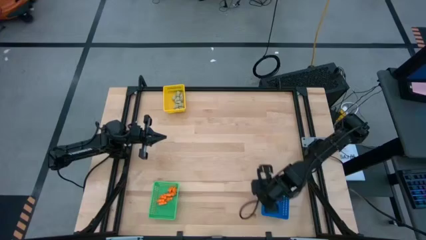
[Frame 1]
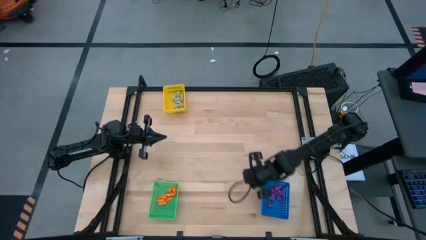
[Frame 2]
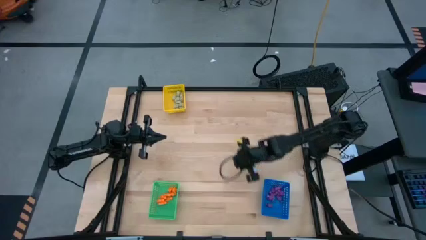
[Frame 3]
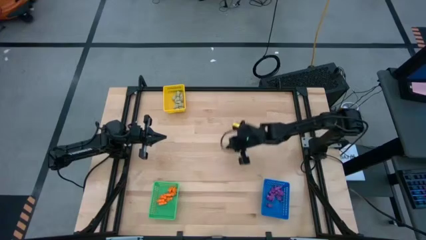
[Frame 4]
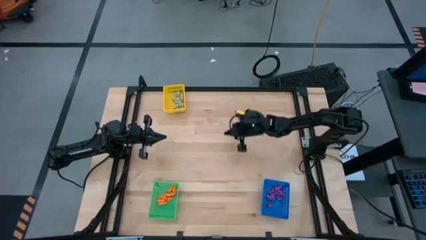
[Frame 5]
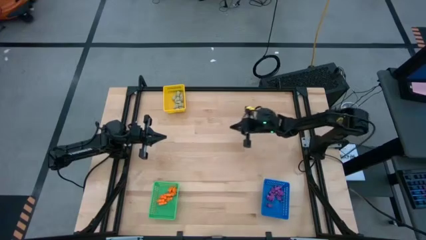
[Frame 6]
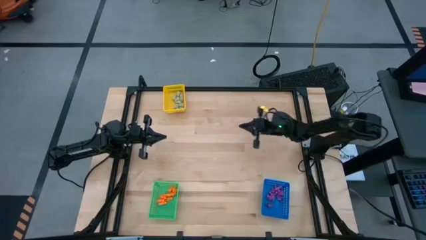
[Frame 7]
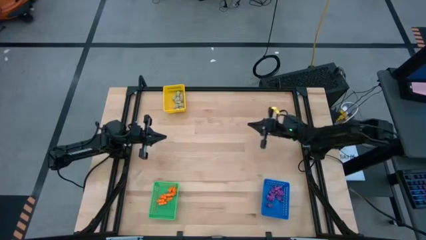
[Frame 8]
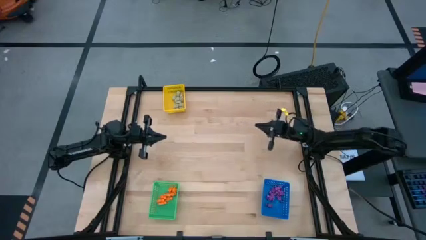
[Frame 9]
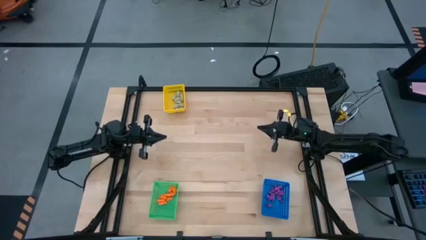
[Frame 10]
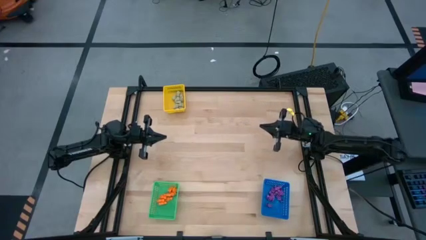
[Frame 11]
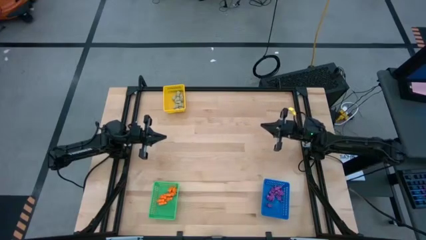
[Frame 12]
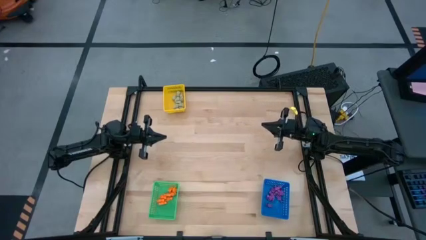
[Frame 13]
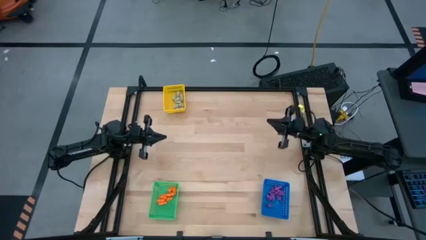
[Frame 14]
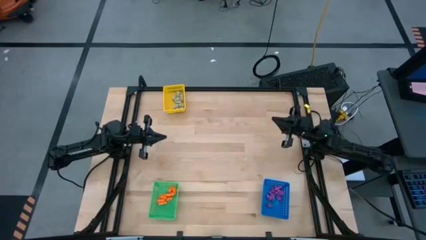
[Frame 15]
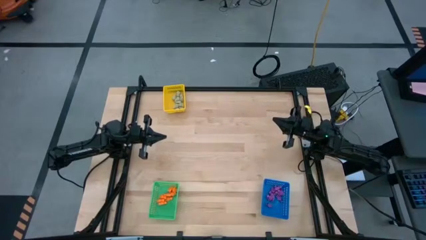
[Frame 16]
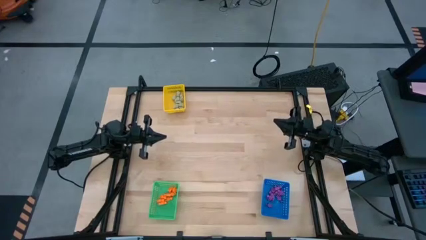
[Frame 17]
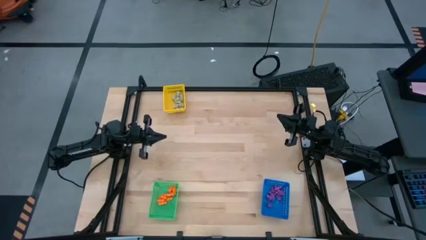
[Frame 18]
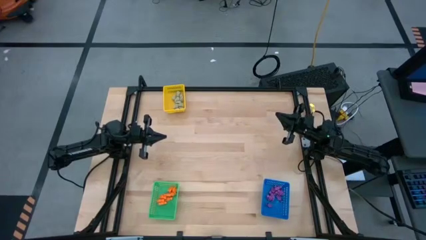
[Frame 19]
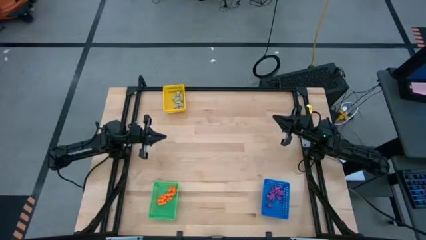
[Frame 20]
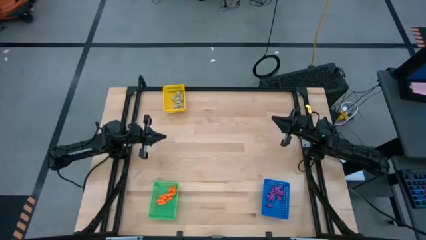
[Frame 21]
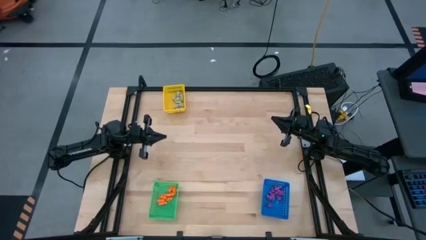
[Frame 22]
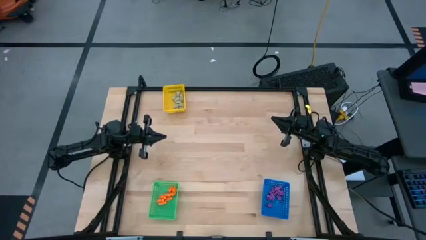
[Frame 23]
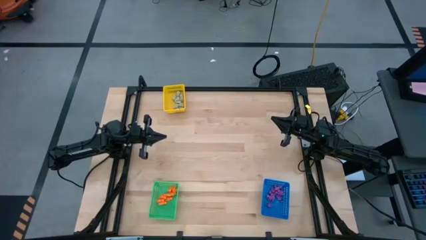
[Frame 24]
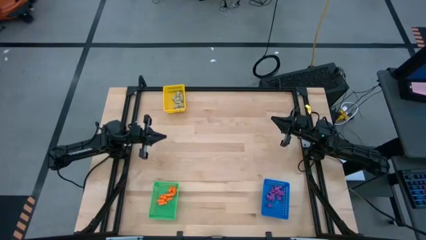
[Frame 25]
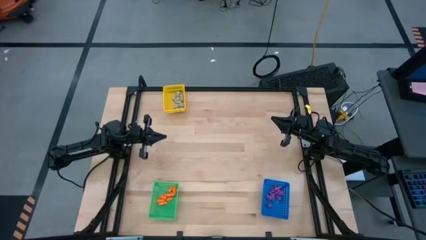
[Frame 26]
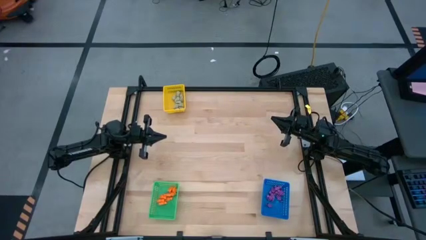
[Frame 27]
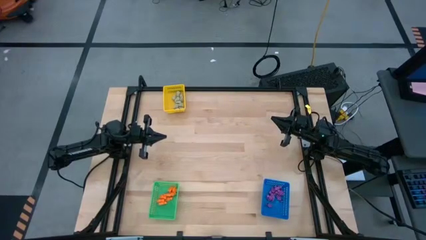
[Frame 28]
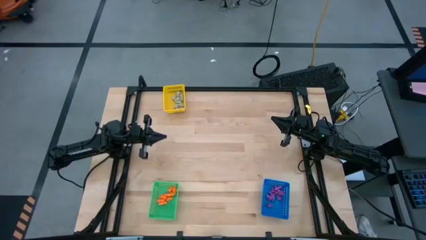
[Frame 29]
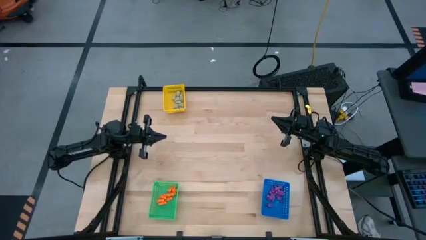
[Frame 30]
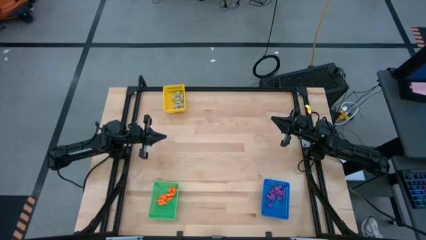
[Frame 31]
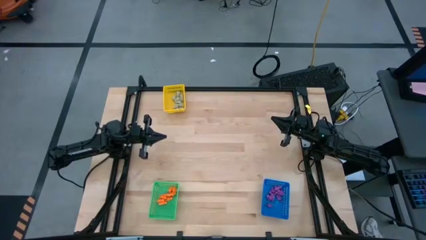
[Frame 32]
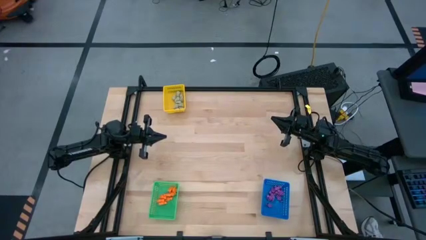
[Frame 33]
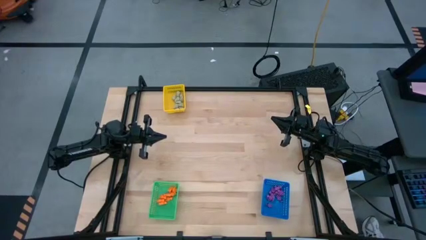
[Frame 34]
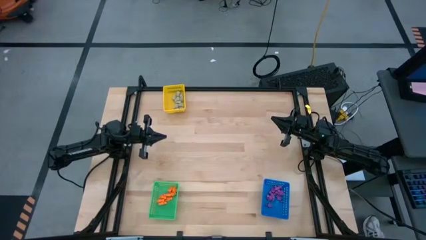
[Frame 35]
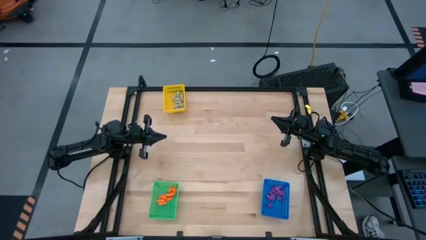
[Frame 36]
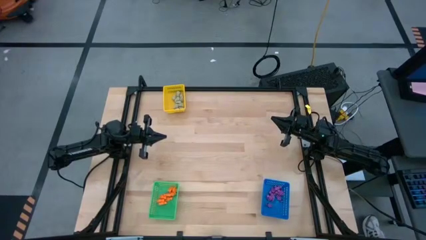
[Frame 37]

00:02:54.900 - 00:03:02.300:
Task: Sort Halloween decoration
Return to Home Position

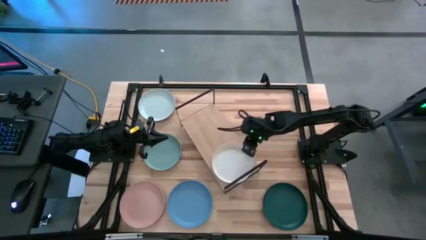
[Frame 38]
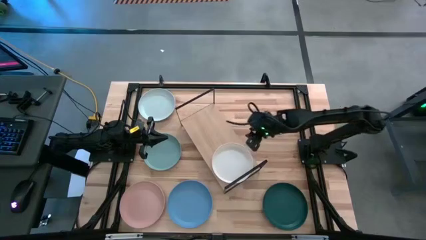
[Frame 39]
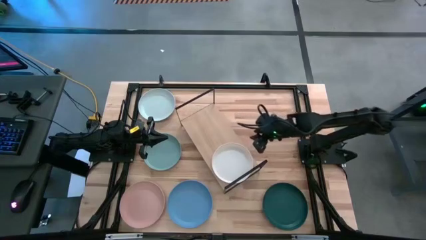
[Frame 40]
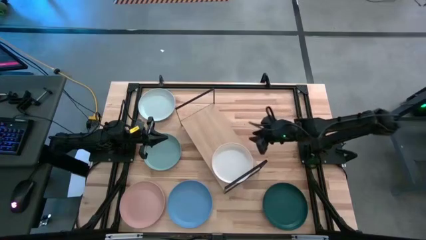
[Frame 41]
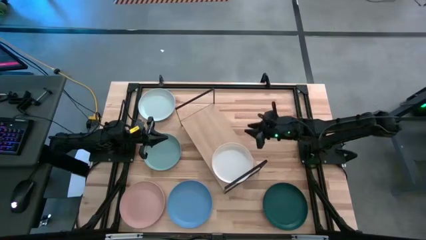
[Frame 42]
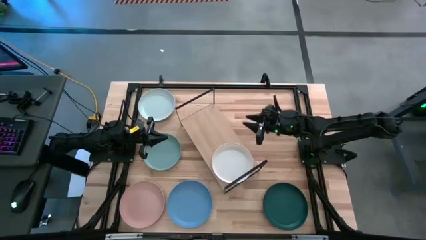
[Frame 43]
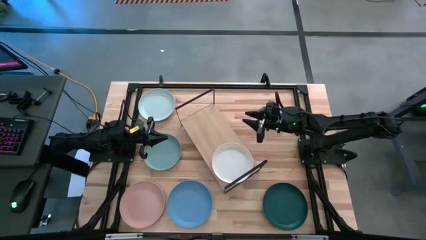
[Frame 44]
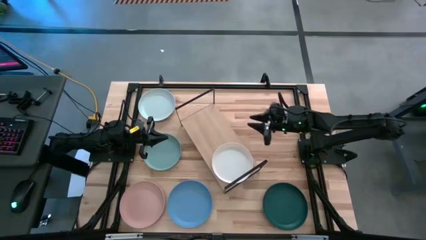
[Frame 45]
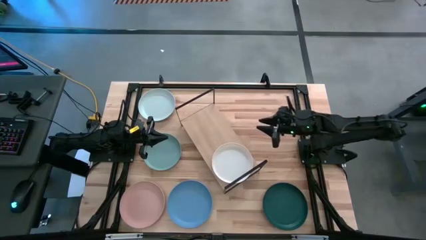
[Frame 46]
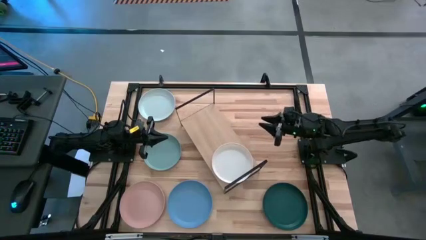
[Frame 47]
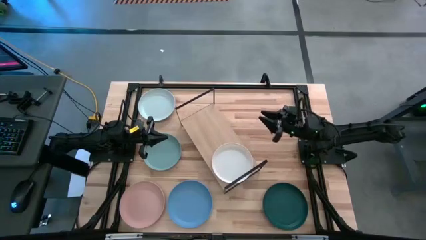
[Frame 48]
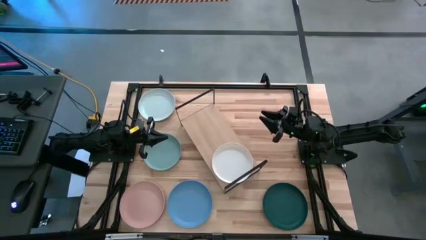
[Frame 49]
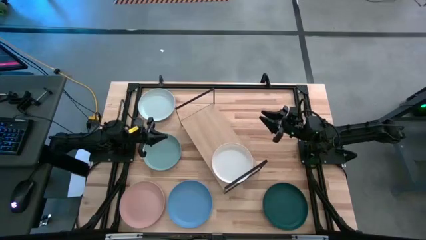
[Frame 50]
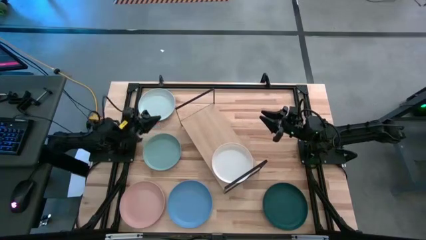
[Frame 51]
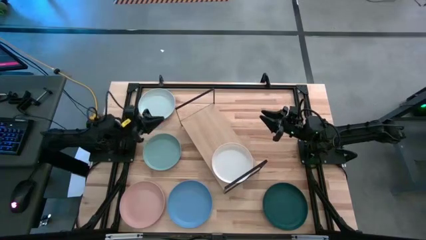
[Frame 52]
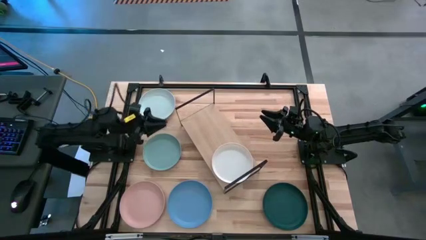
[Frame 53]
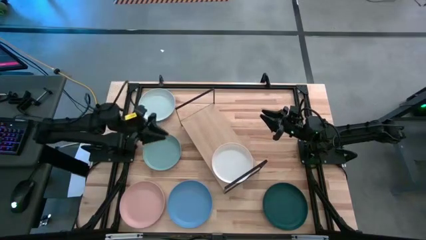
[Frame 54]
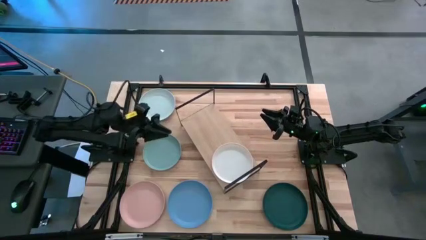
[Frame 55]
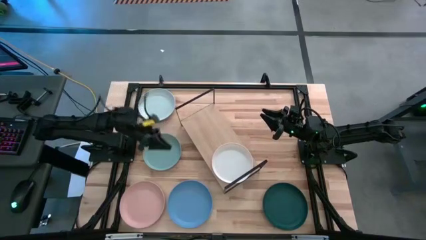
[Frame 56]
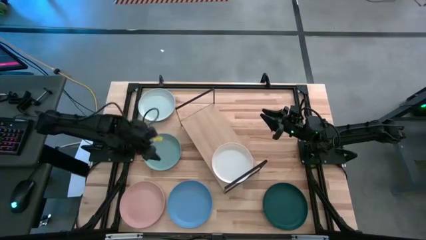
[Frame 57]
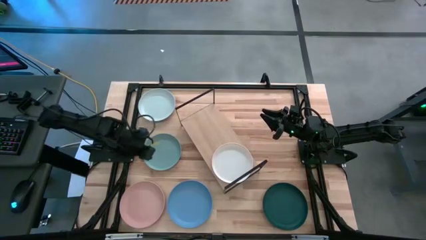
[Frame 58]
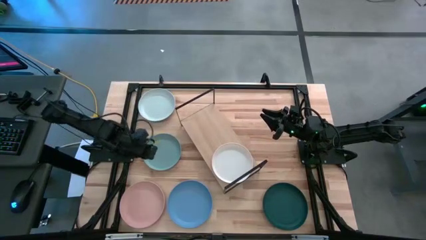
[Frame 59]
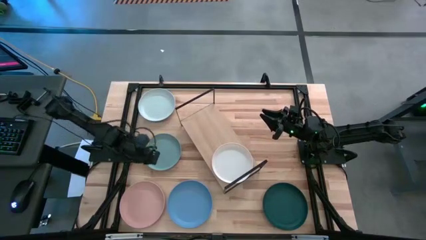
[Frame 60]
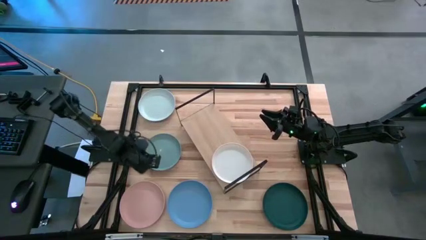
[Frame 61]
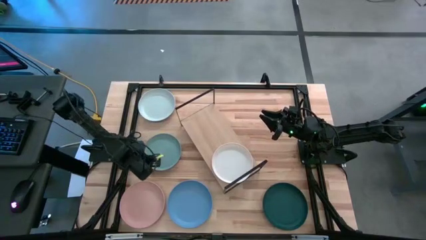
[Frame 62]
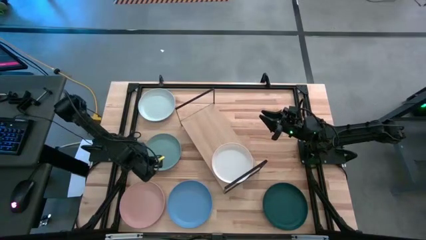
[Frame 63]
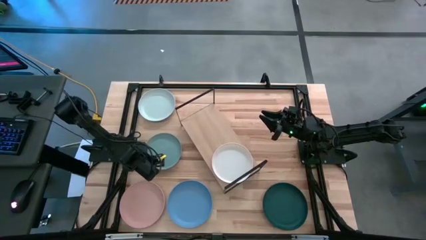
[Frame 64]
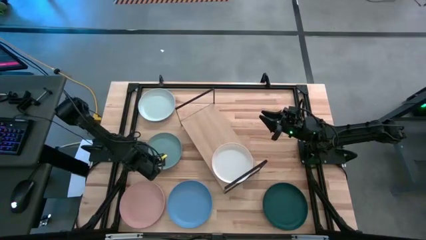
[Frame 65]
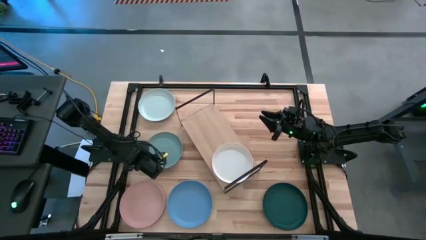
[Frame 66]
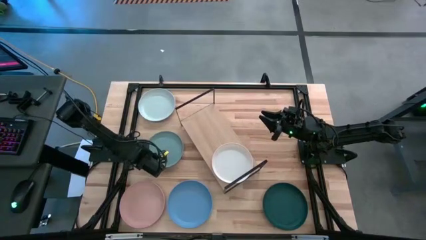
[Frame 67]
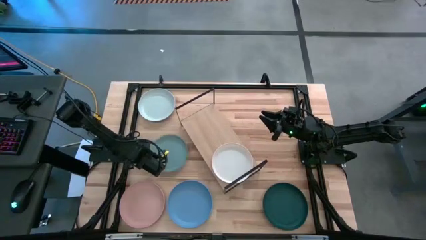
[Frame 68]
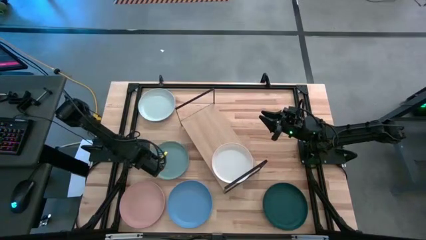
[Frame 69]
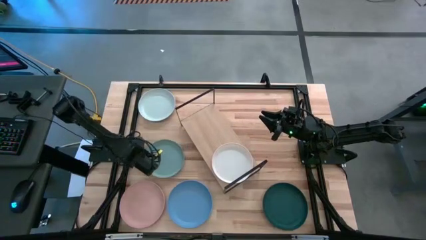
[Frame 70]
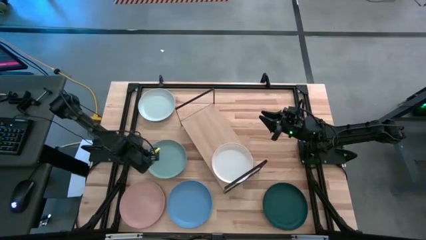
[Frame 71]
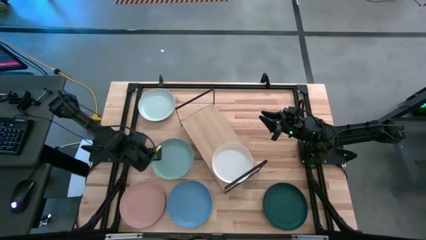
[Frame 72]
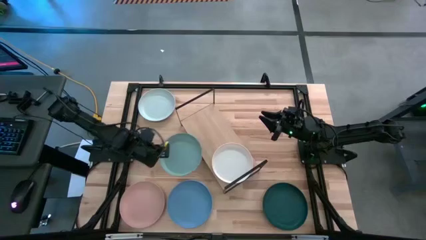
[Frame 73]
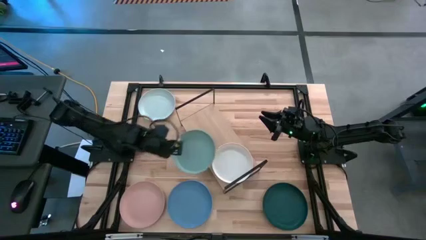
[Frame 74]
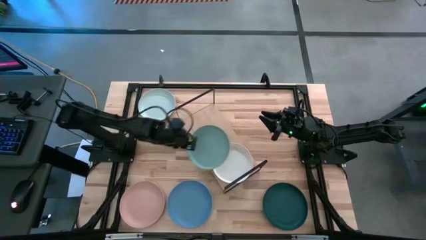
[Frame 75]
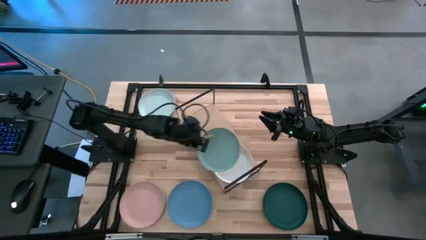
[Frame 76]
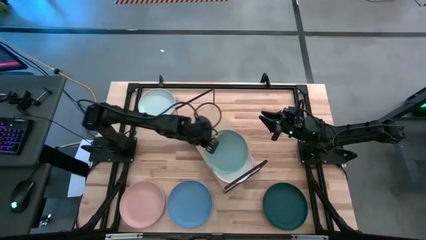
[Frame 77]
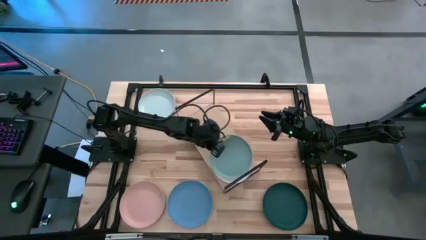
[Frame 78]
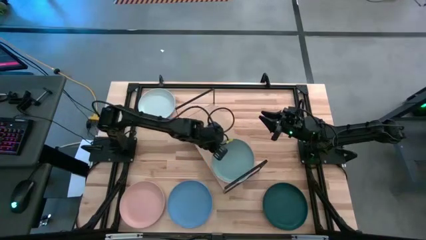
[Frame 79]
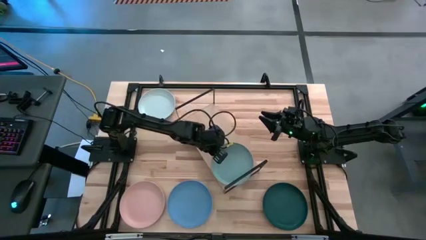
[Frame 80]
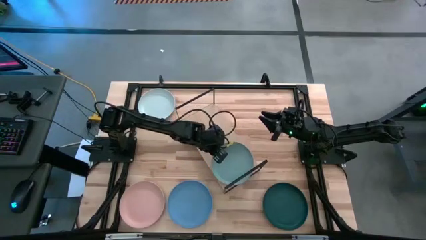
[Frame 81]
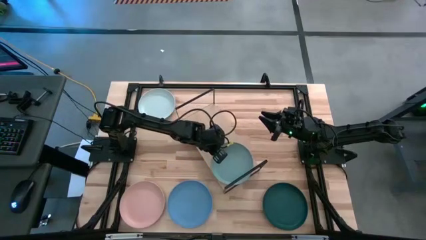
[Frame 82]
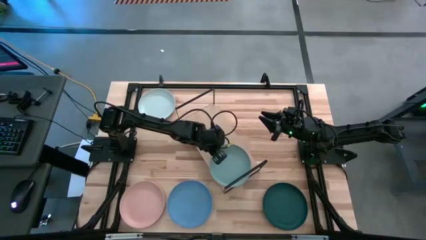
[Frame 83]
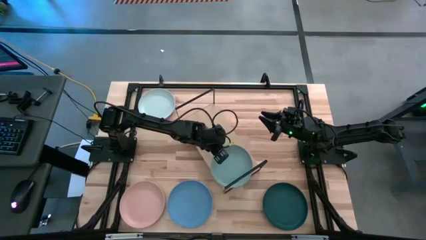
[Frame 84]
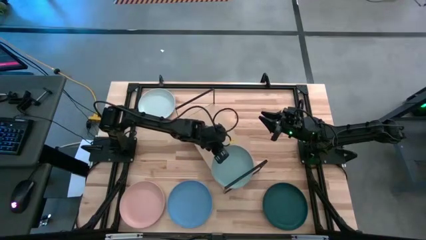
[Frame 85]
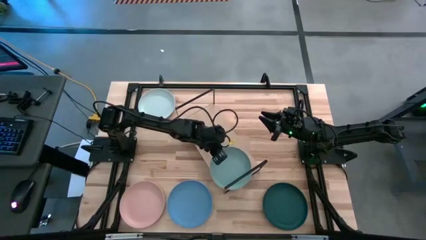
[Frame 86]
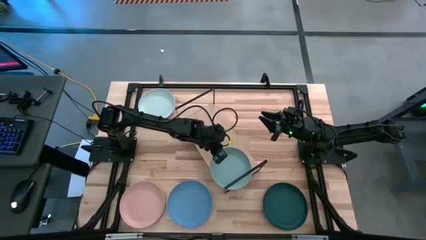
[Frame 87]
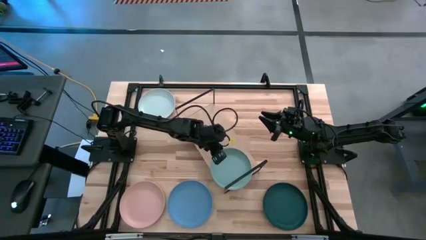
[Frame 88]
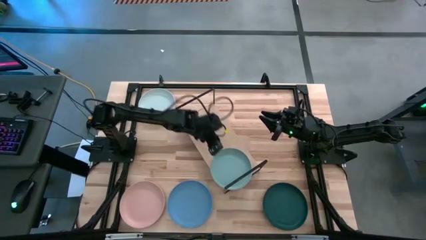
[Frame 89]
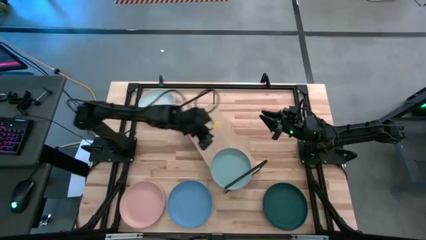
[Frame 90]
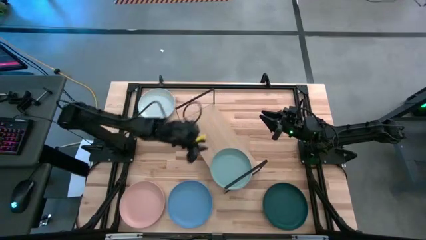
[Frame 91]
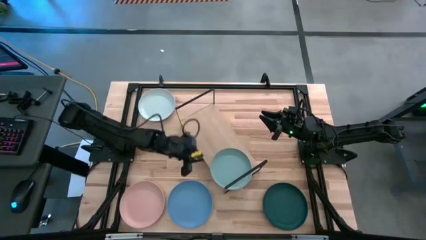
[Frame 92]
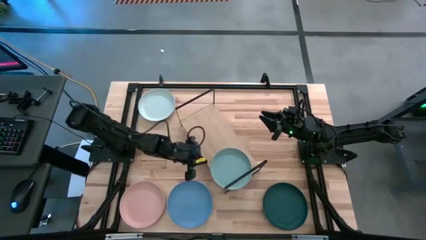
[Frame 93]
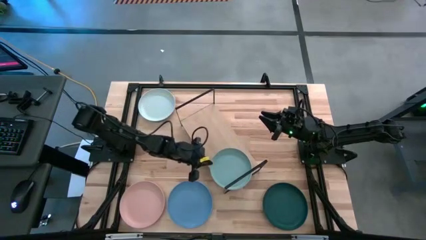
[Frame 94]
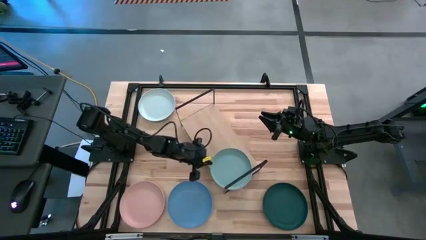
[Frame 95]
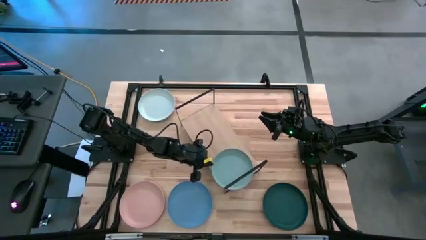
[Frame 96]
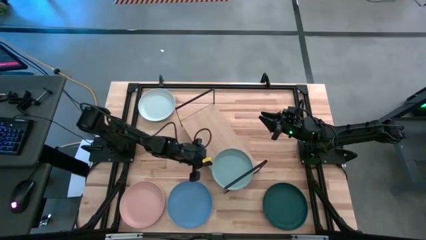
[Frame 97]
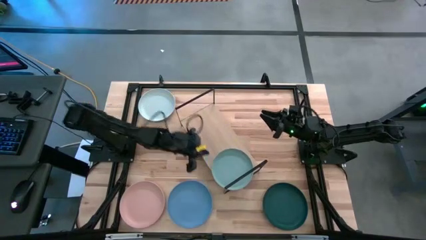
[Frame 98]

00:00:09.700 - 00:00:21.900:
Task: Place and stack plates onto a shelf
Stack the light blue plate on top of white plate on the shelf
